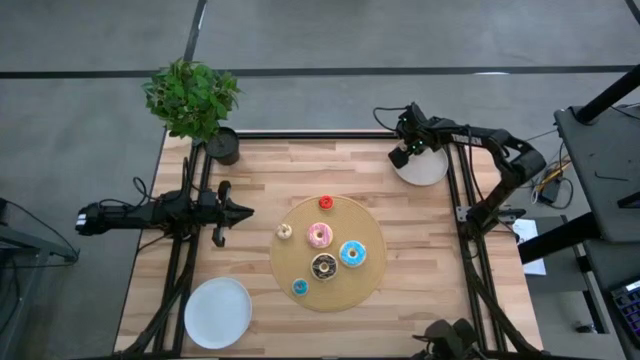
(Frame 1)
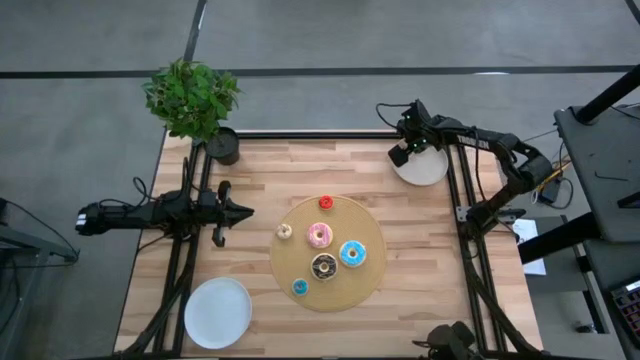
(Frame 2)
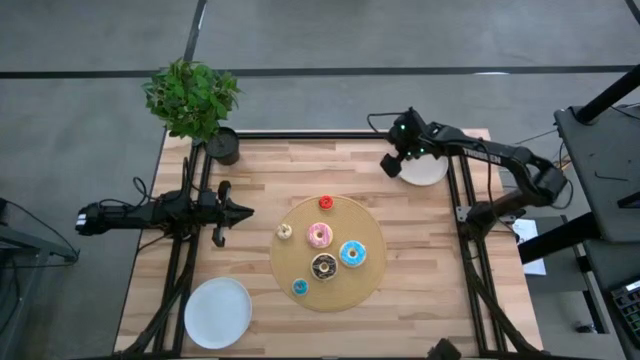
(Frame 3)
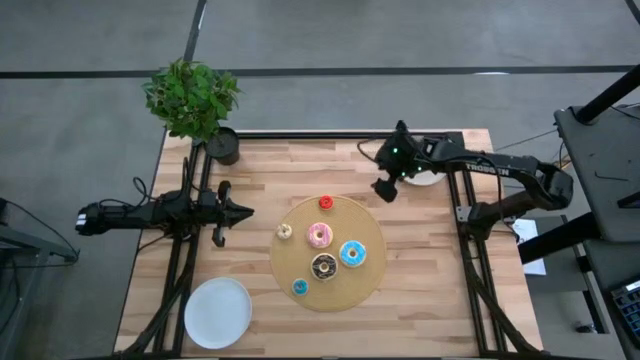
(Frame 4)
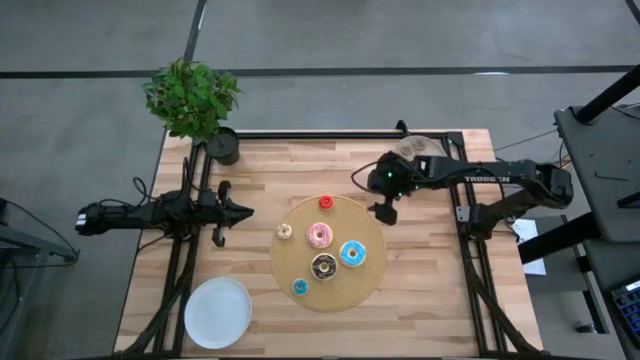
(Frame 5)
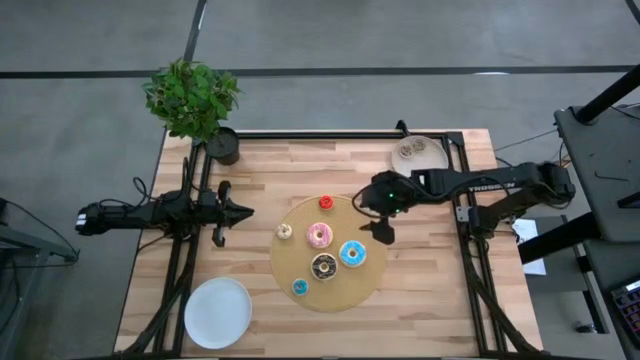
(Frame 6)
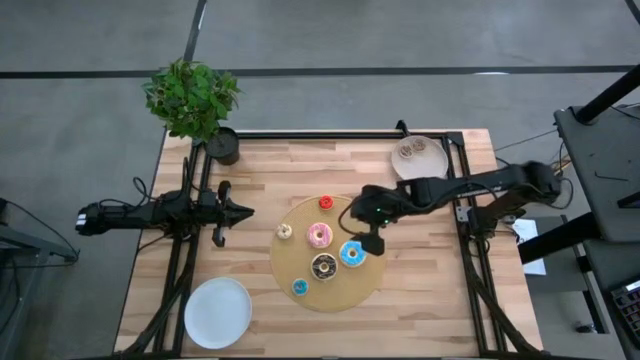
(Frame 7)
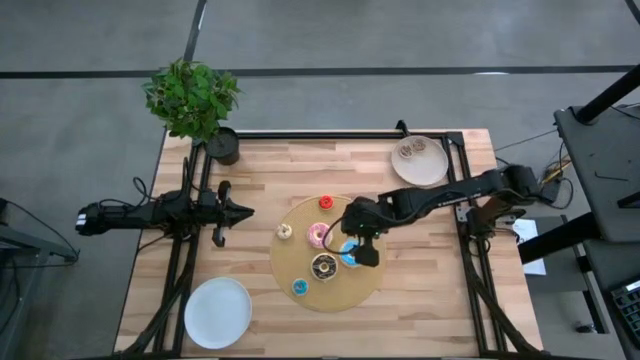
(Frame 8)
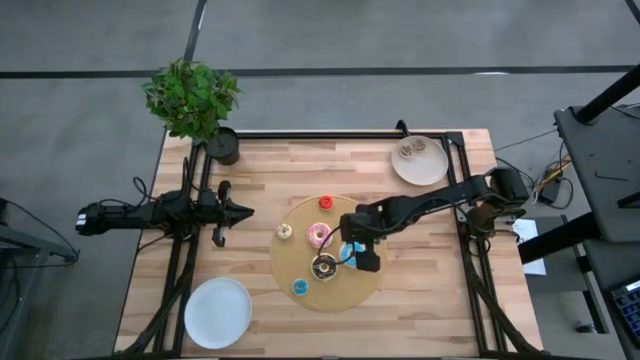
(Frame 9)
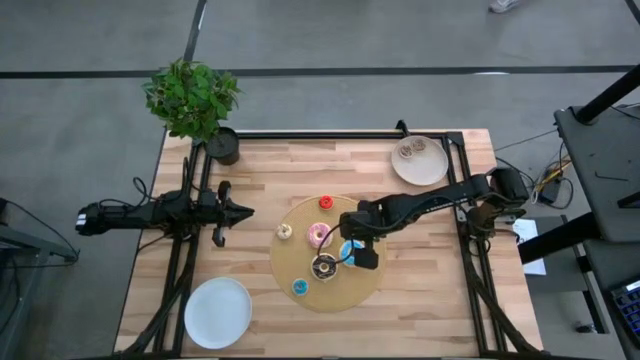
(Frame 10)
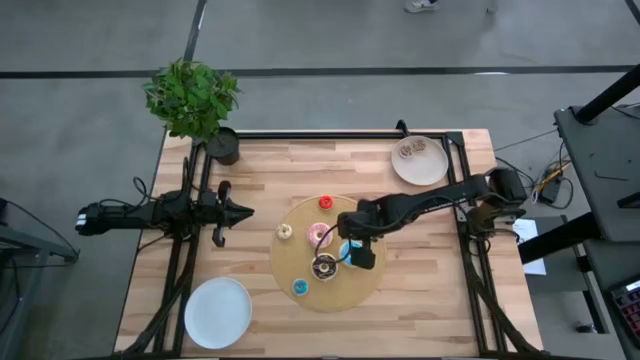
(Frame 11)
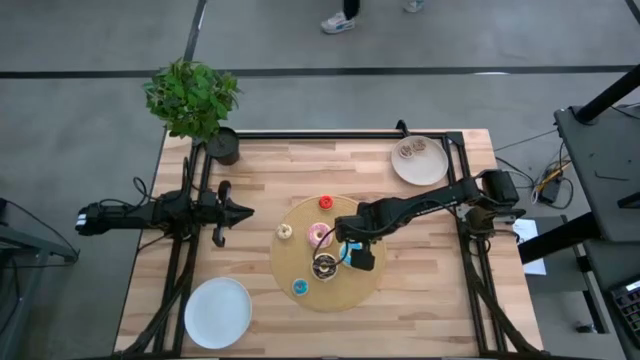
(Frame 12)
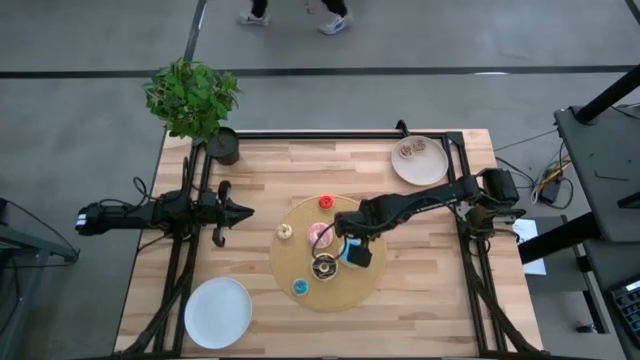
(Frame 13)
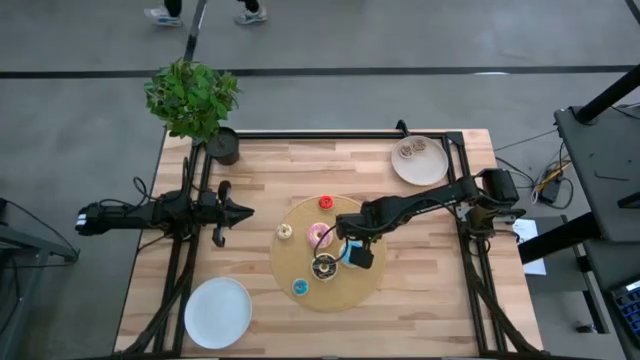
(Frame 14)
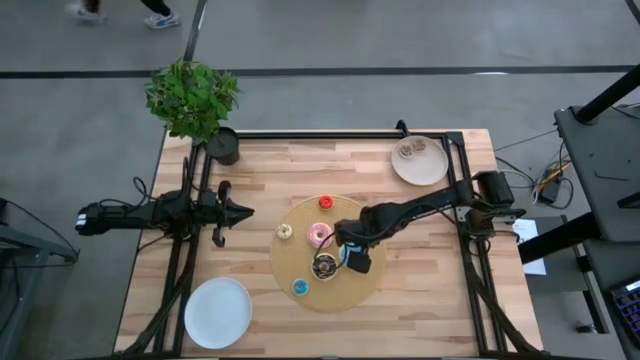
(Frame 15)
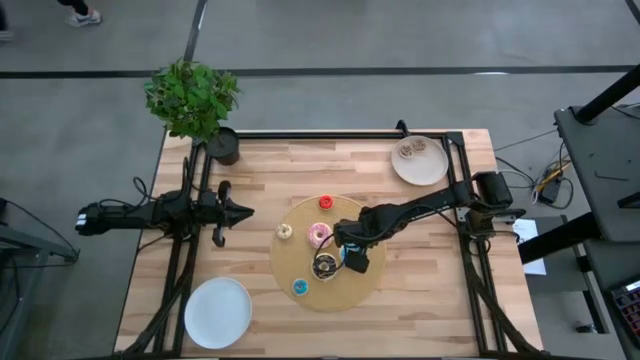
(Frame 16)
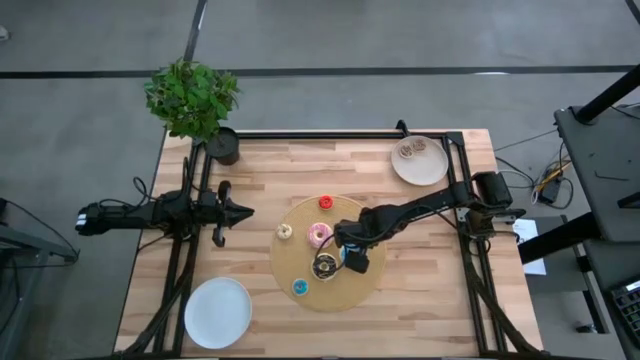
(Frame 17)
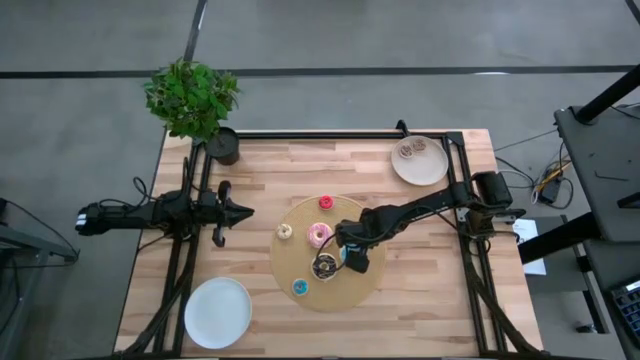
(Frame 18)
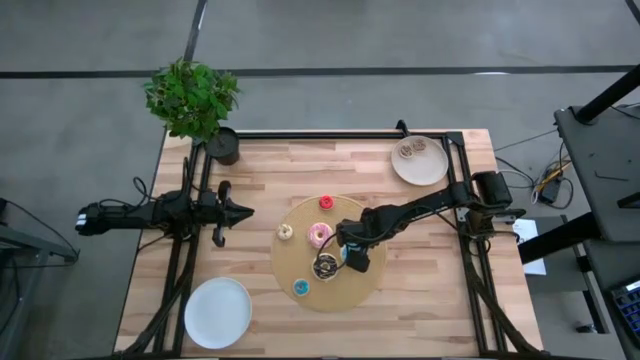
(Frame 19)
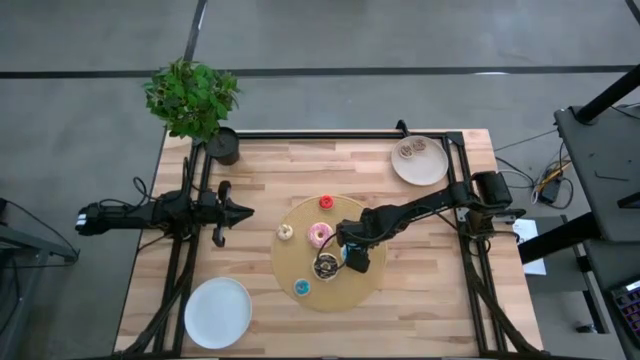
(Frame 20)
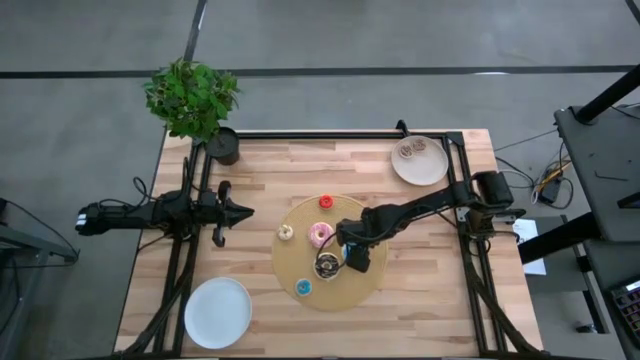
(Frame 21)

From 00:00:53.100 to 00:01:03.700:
Task: Pick & Place donuts
Put the large blue donut on the white plate

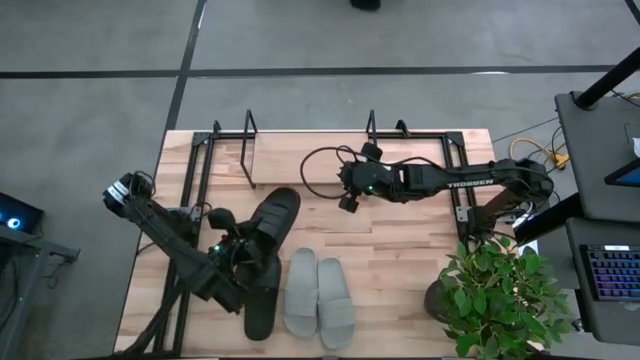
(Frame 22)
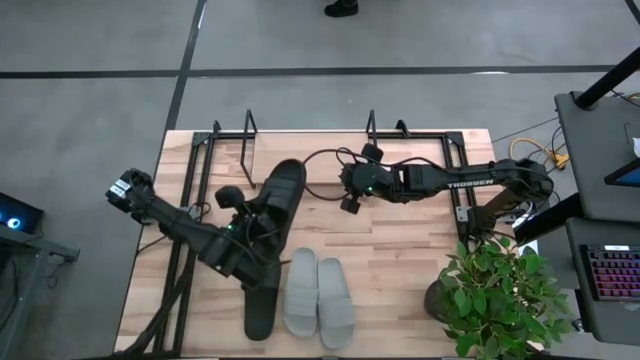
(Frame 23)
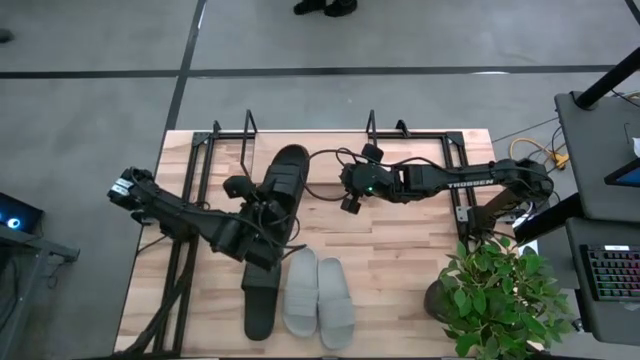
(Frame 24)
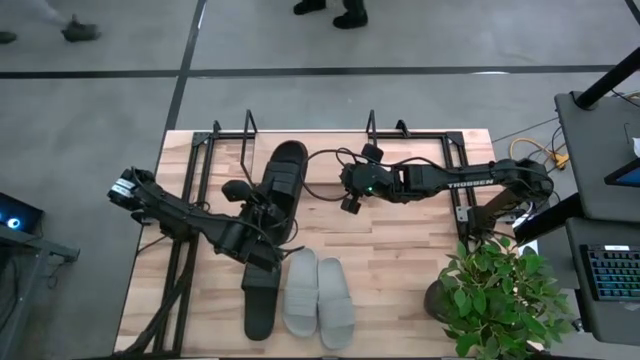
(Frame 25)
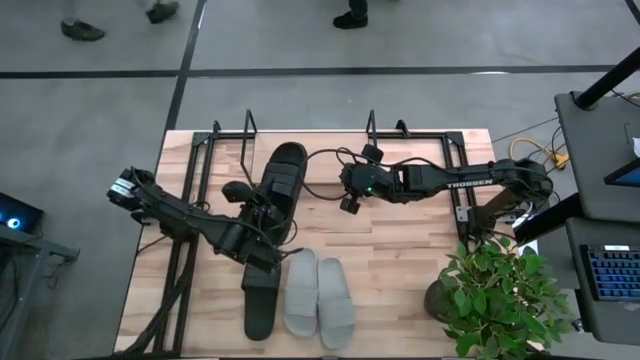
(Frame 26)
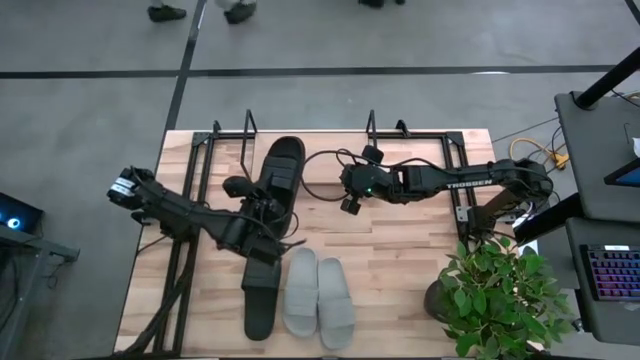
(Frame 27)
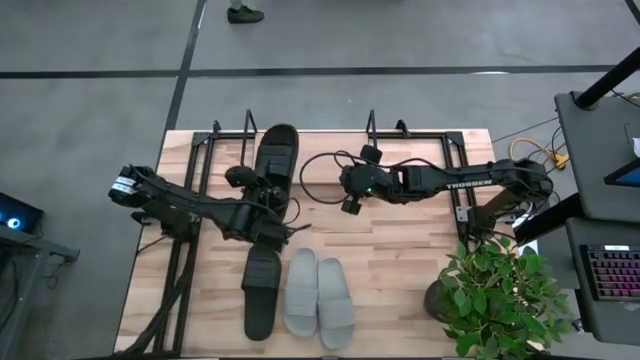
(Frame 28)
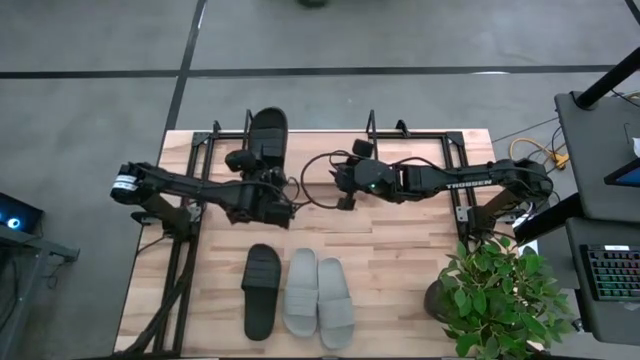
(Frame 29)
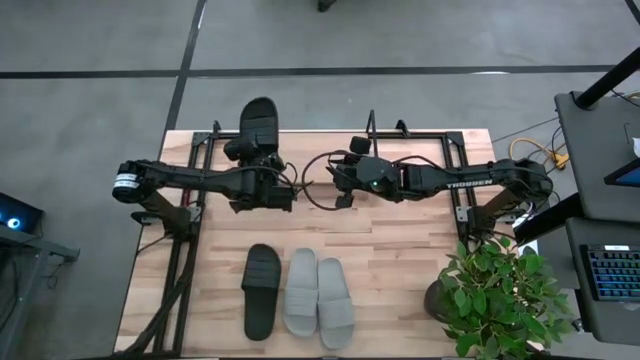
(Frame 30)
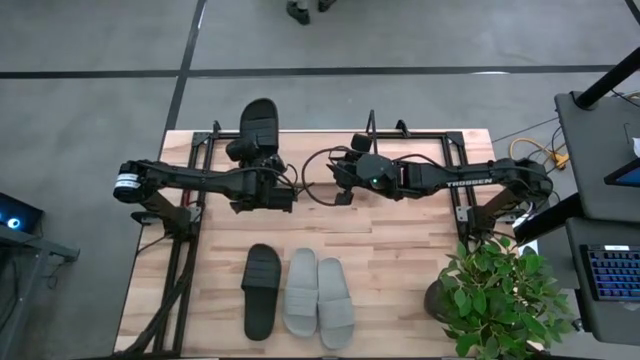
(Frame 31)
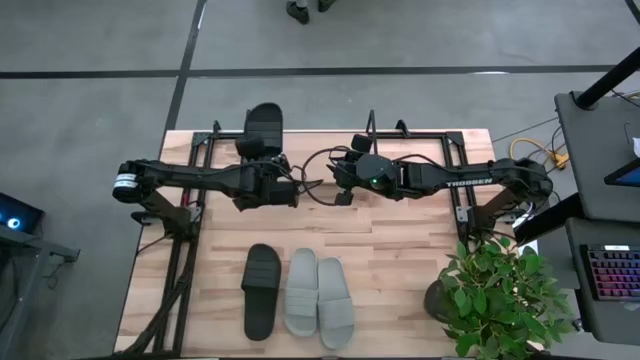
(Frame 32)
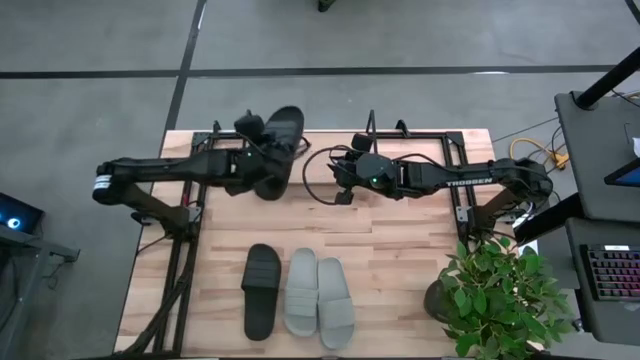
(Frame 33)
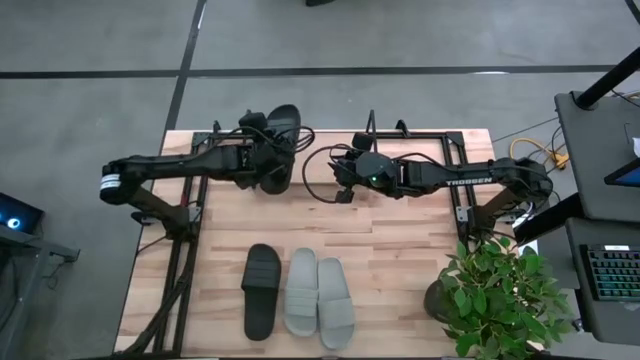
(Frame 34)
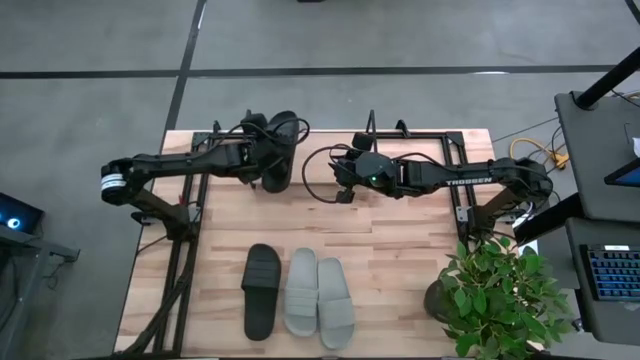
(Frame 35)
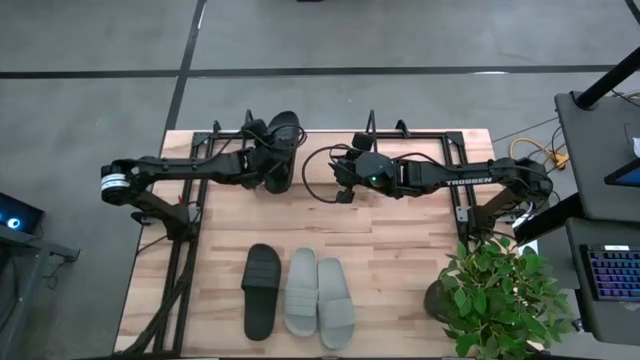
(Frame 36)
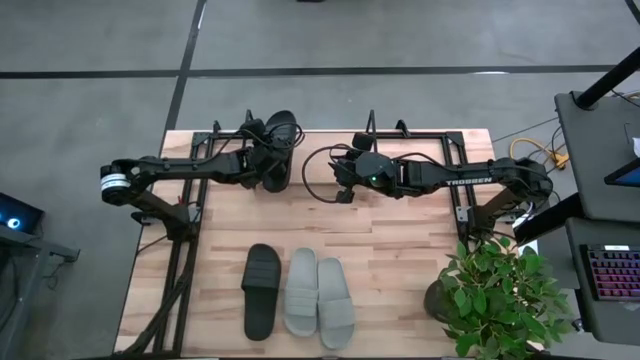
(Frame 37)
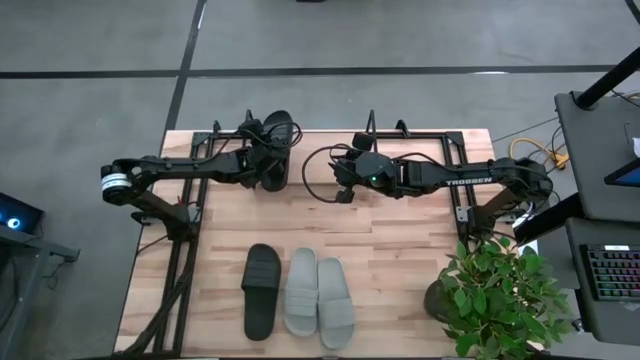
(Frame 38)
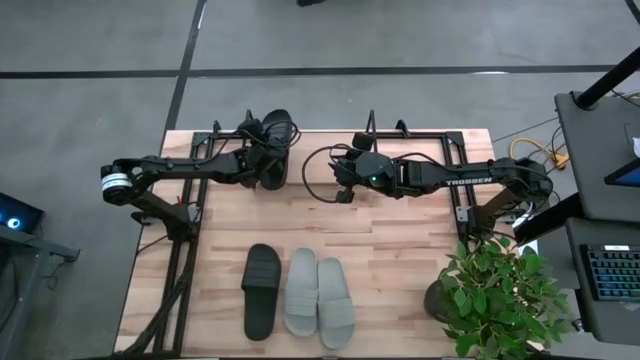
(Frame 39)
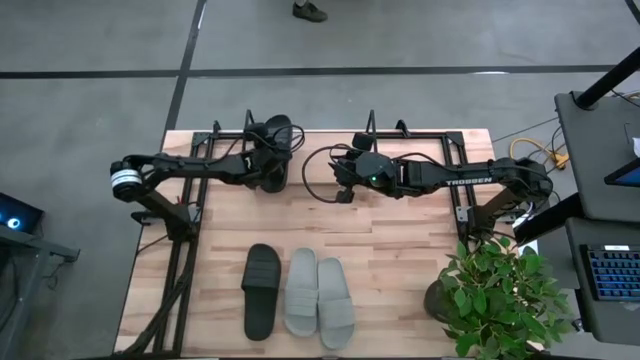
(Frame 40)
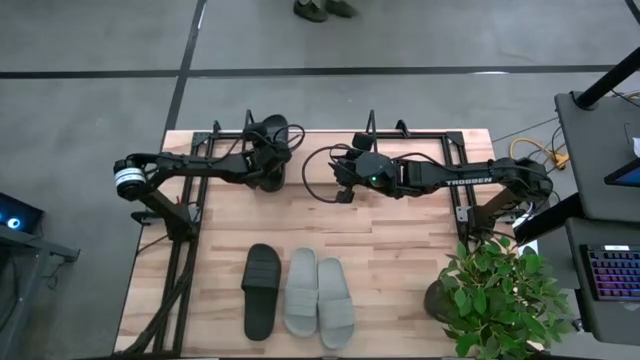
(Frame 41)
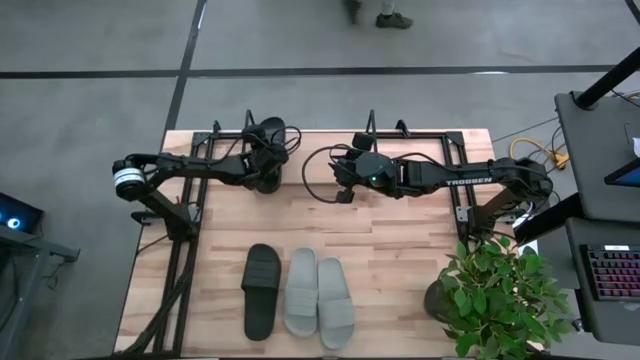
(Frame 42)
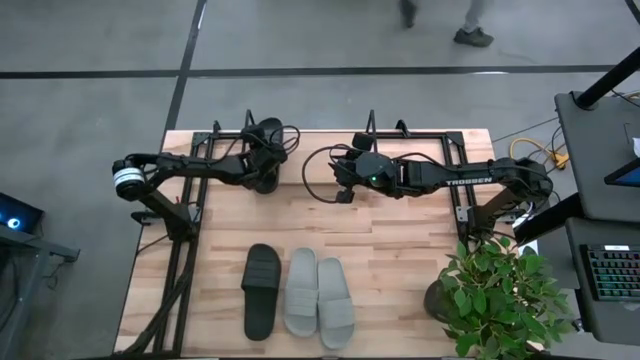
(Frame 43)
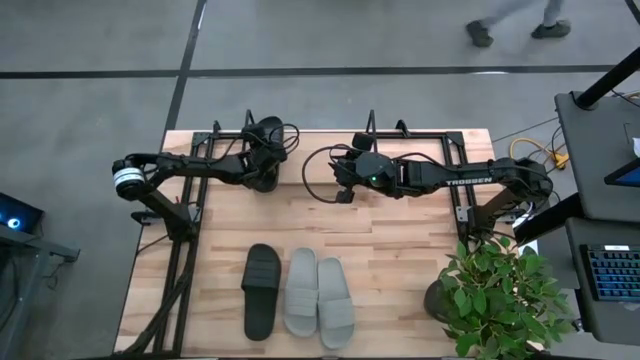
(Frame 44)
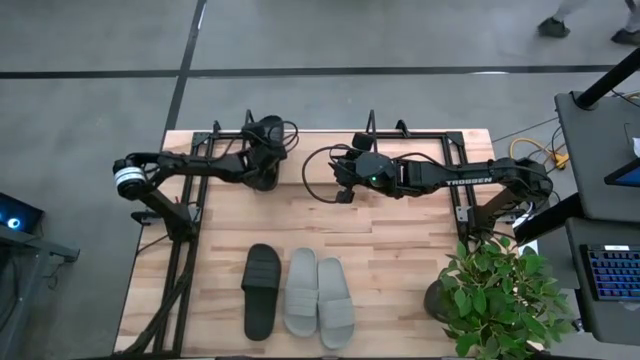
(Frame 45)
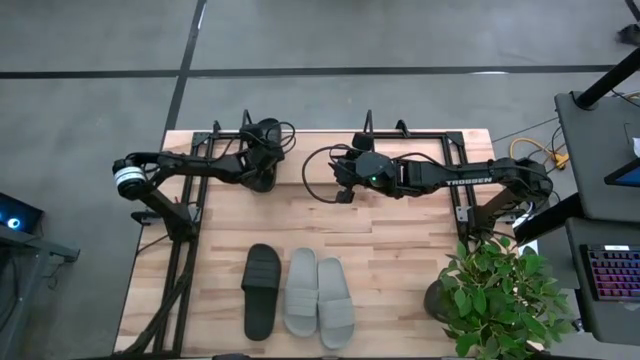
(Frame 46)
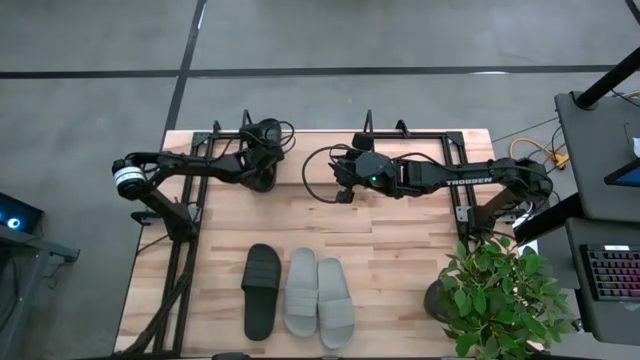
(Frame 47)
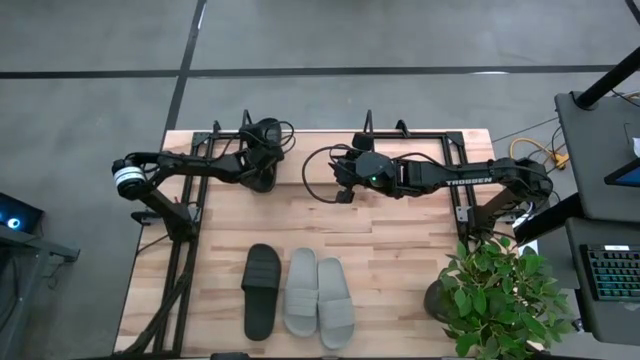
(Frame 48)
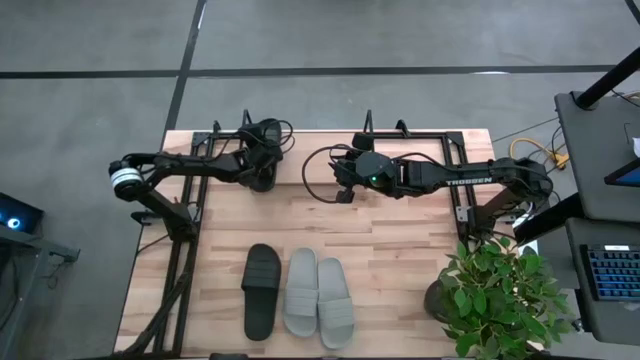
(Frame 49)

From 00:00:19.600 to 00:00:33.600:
Task: Pick and place slides into the shelf
Put the left black slide on the shelf
